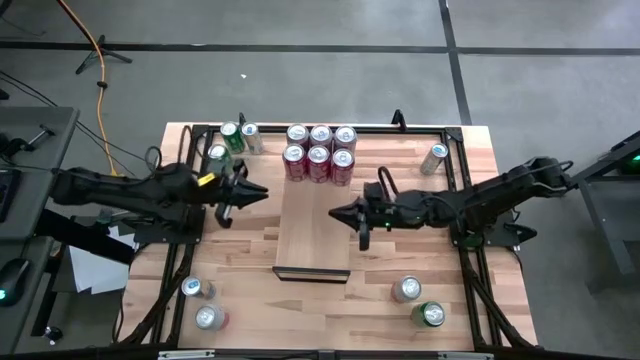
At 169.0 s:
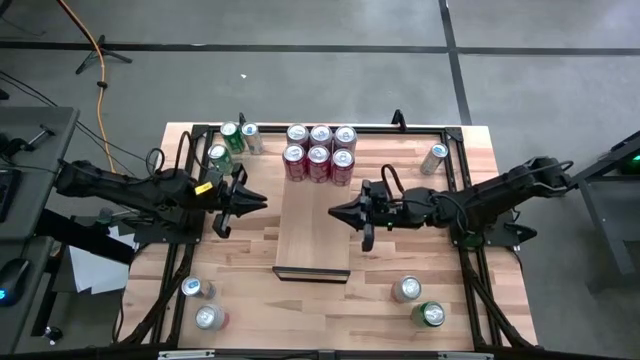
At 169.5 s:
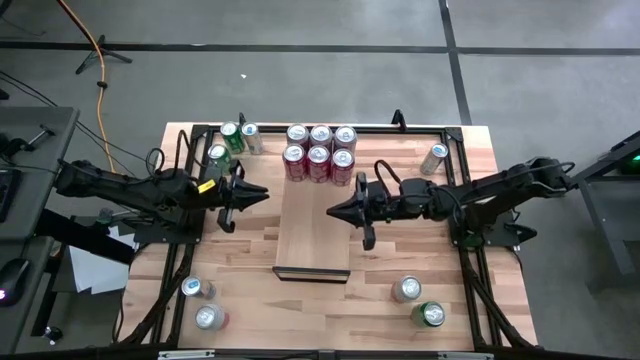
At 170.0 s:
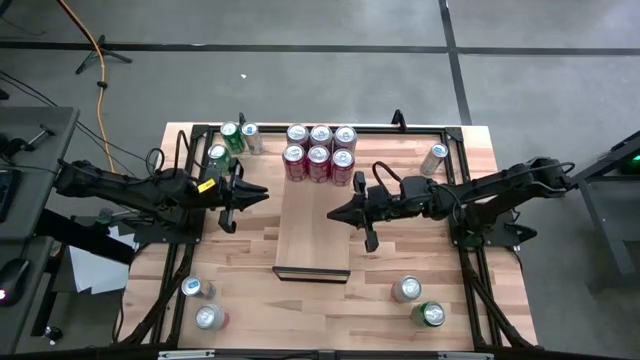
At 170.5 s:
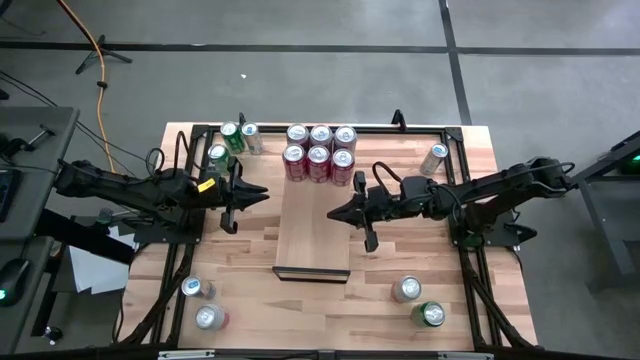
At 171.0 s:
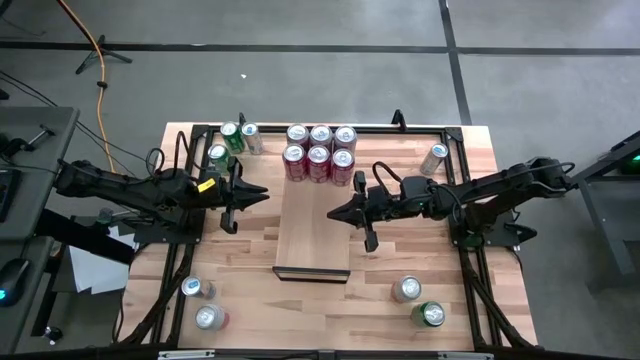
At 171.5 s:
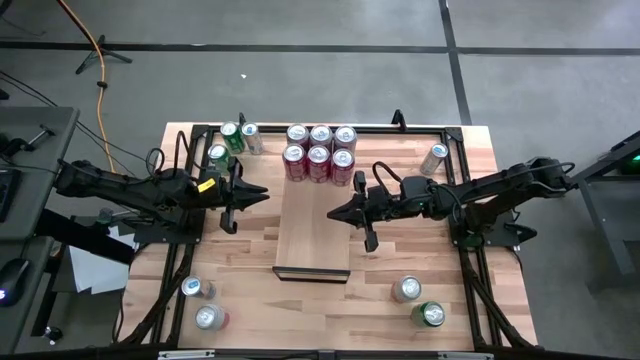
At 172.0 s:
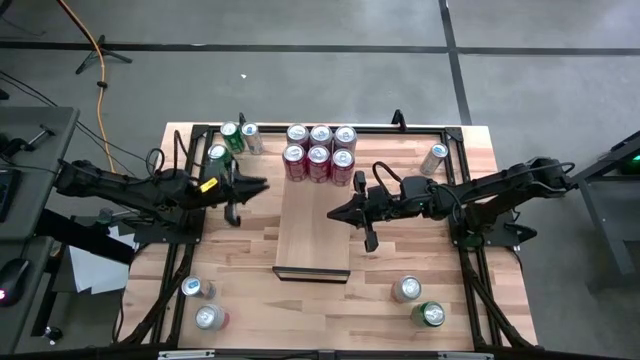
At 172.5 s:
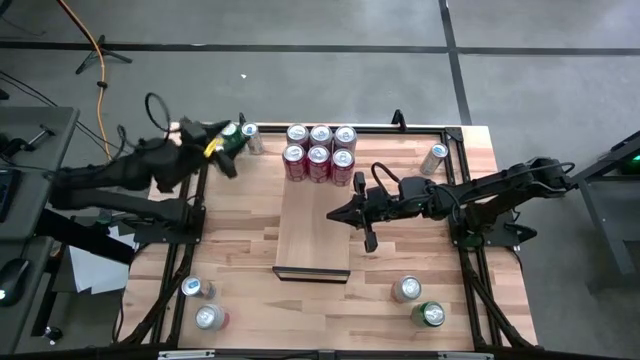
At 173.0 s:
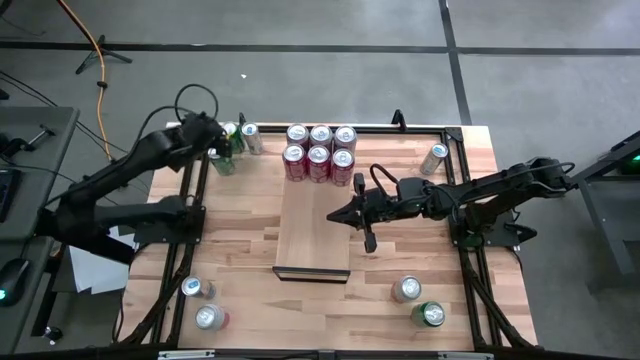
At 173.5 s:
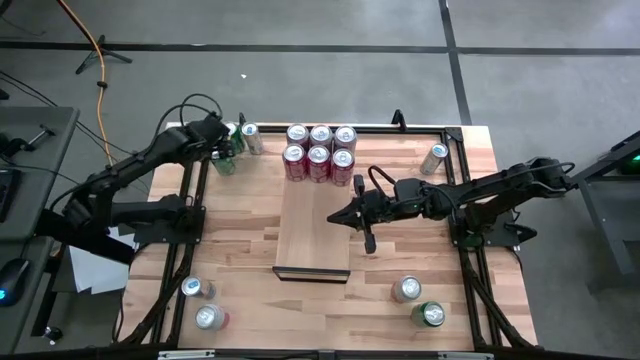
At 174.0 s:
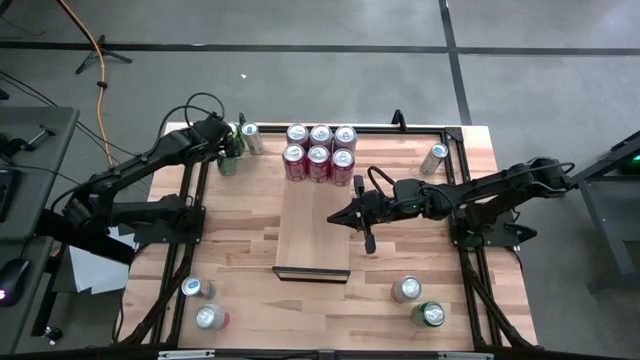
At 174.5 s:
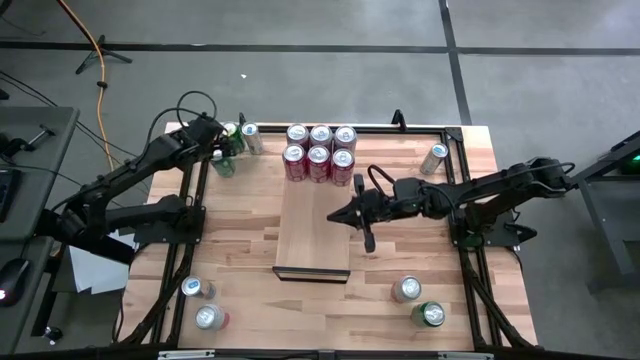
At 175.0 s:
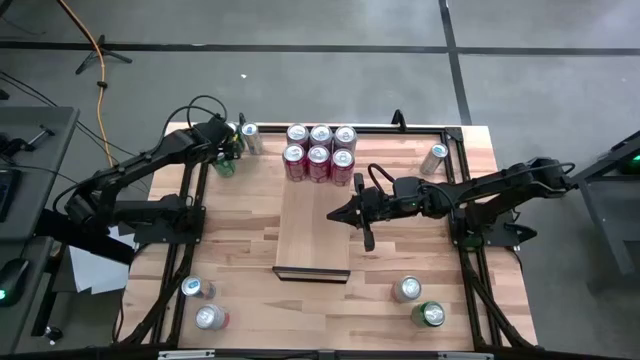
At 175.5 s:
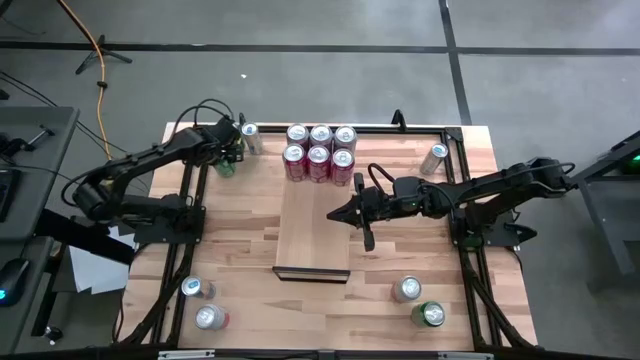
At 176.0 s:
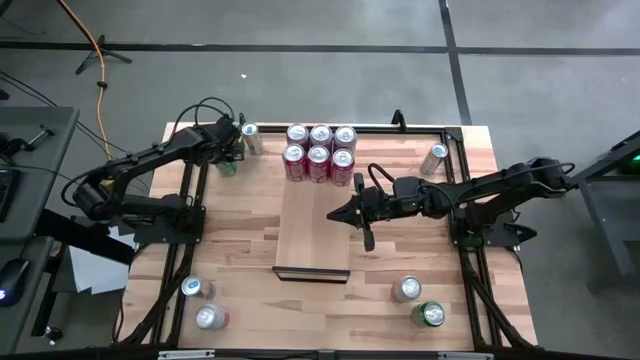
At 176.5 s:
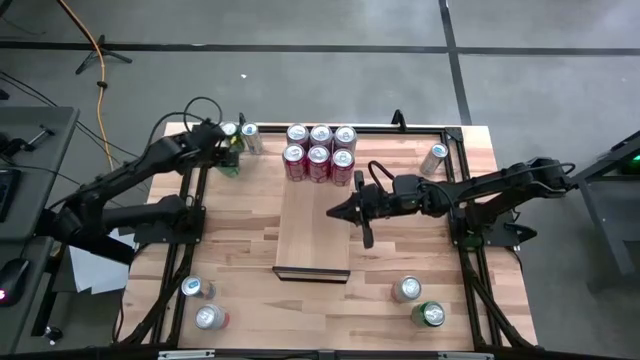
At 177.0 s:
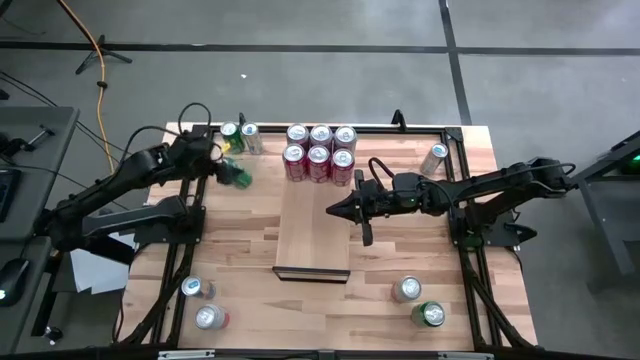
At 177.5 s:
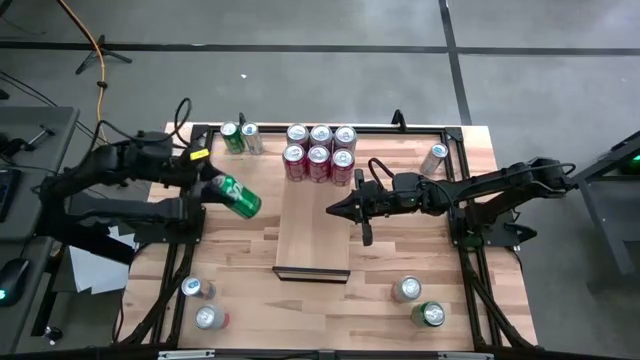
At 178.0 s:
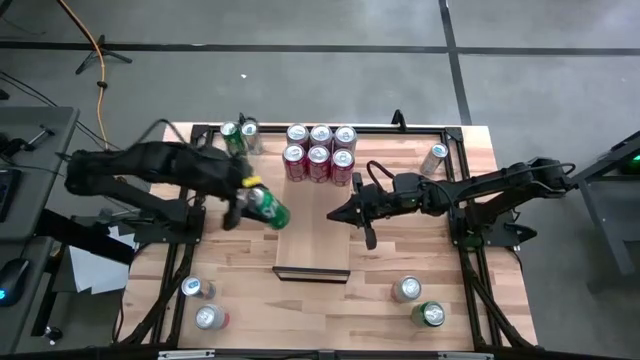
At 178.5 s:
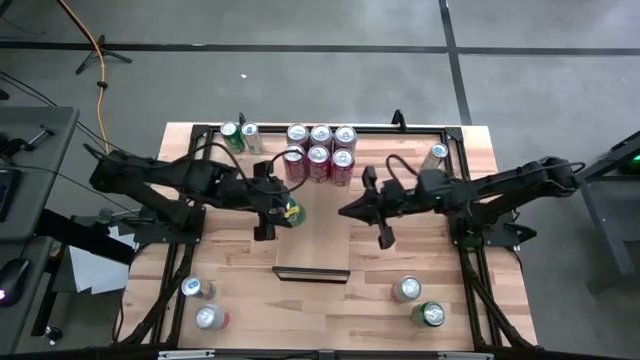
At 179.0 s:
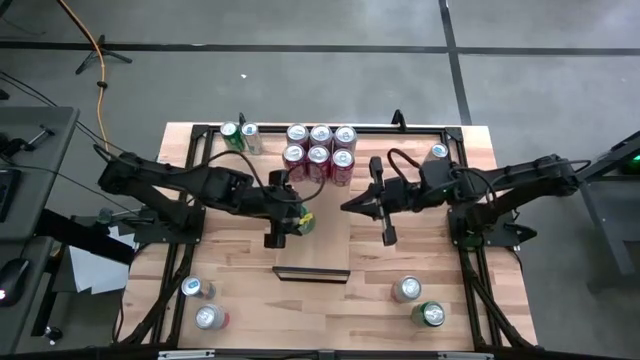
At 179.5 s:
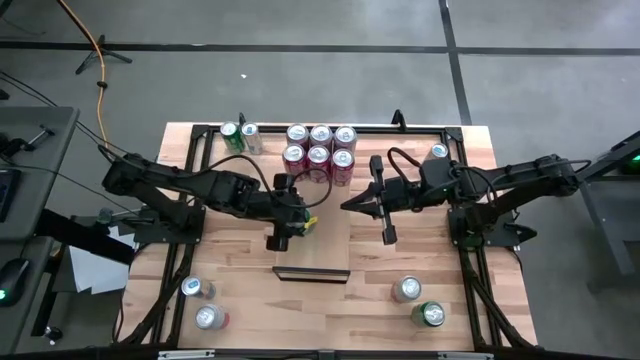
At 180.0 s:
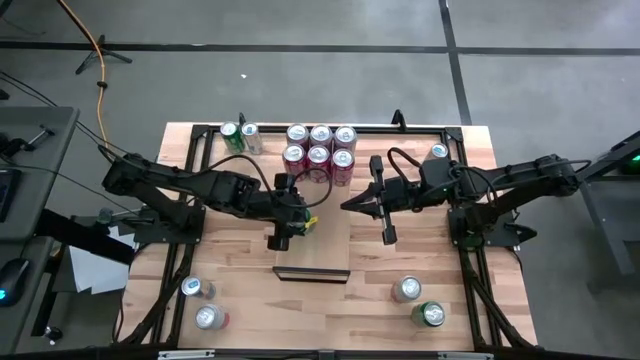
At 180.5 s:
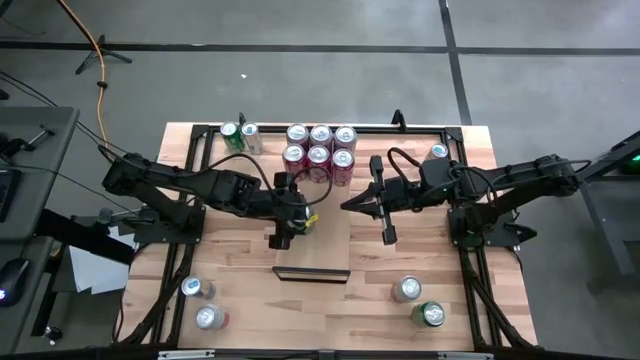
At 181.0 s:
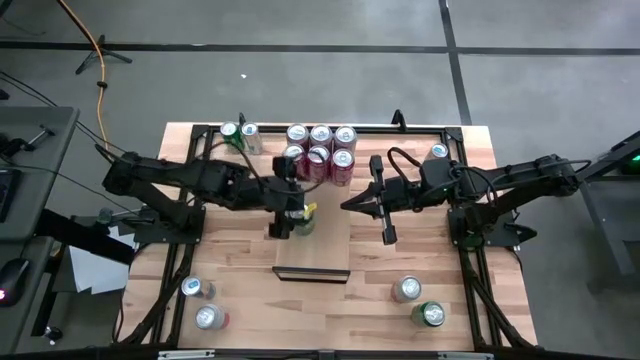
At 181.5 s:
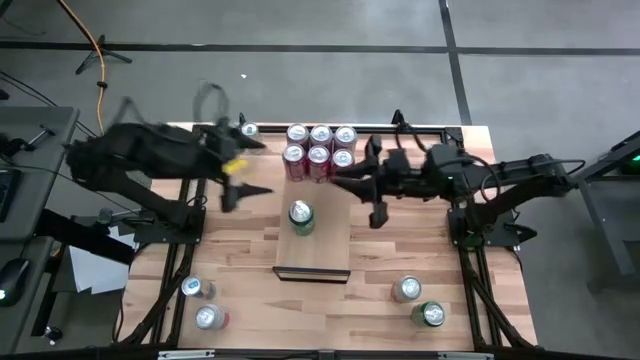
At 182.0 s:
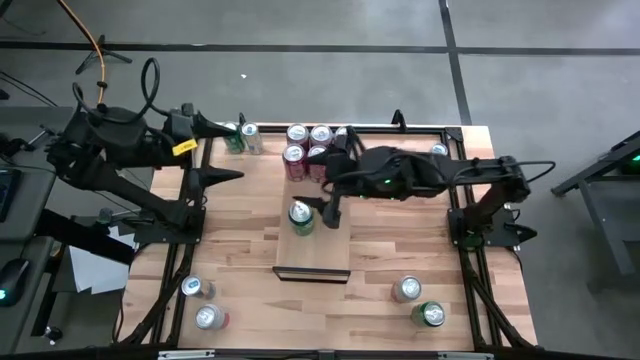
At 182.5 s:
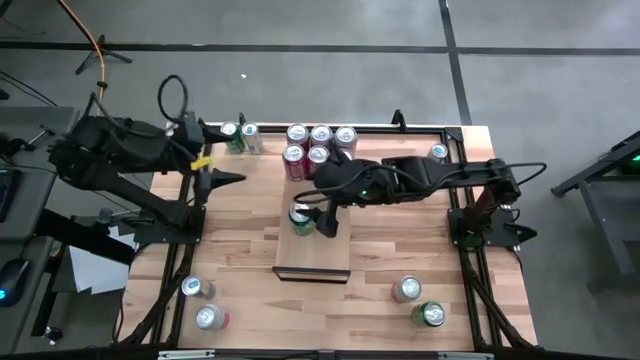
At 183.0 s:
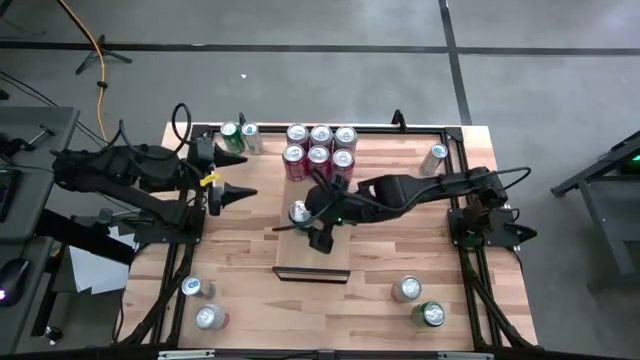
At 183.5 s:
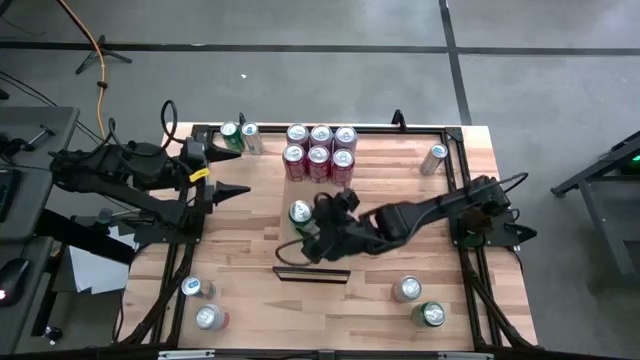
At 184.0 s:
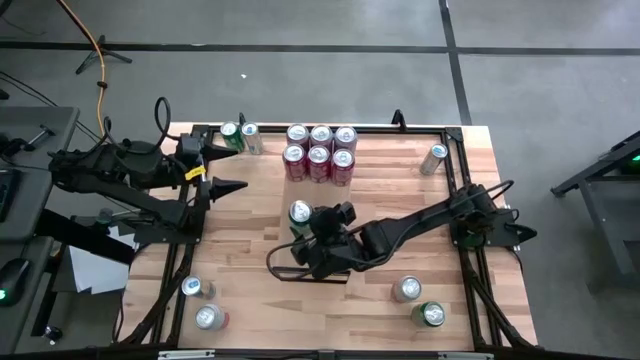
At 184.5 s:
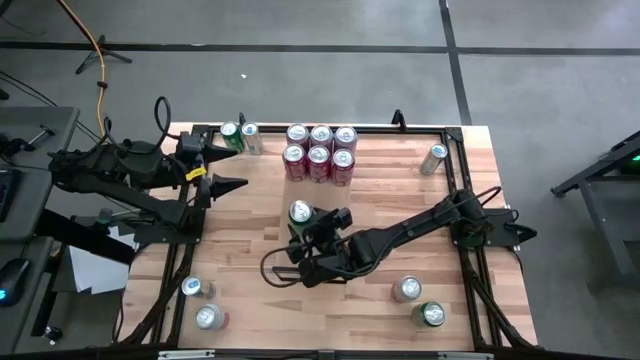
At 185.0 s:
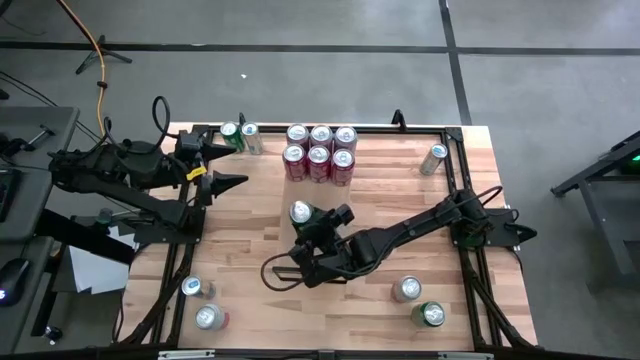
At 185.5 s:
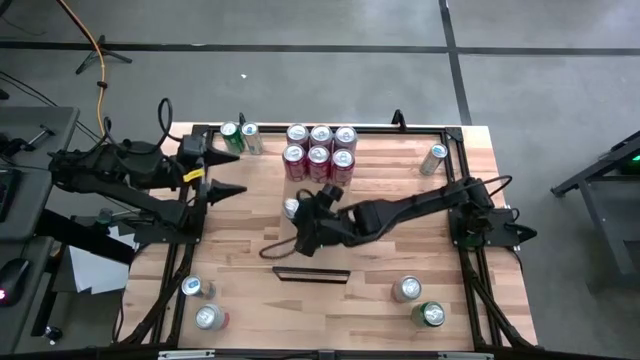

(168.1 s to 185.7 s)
Task: Place canned beverage on shelf
Put the bottom left green soda can on the shelf

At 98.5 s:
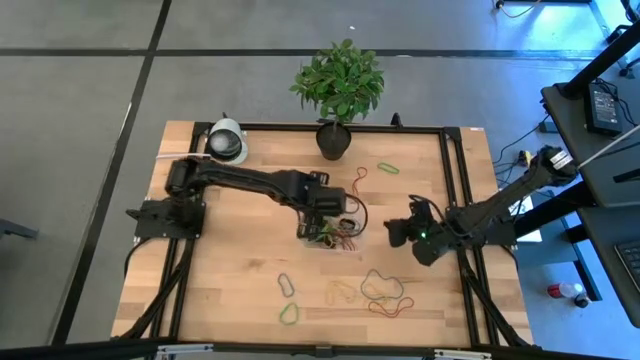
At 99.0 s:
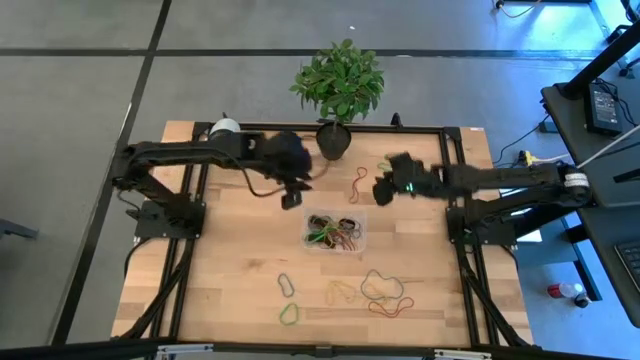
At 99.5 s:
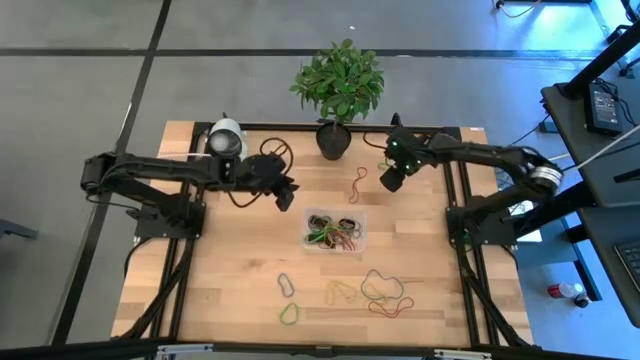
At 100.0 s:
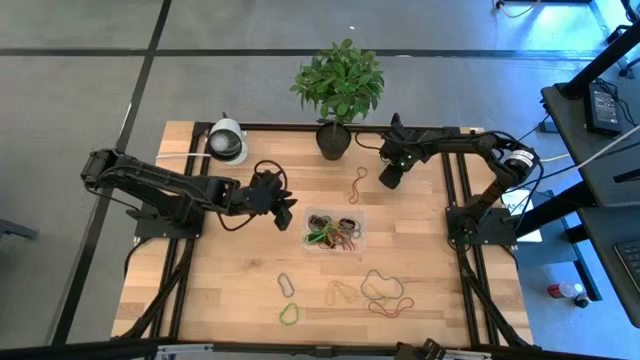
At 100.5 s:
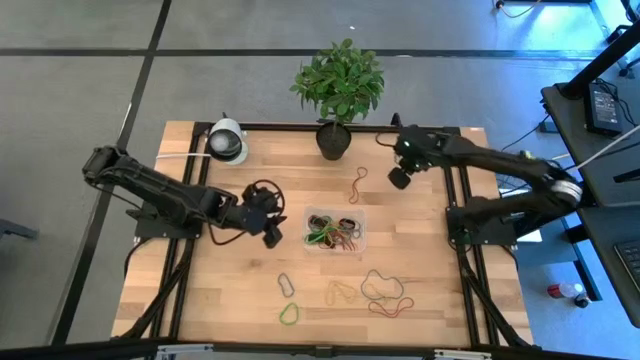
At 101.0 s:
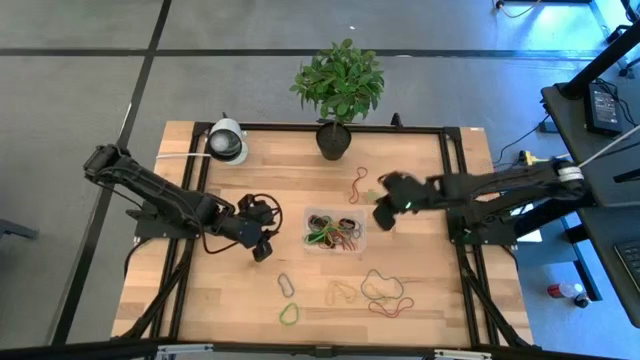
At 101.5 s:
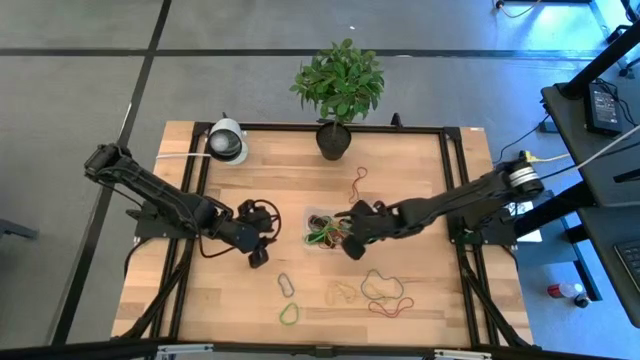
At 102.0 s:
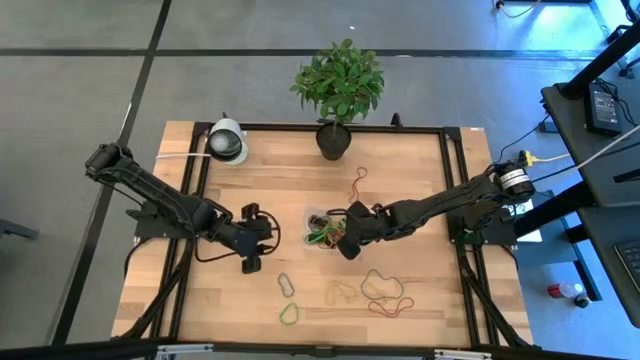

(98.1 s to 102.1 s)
Task: Pick and place rubber bands into bin
Put the green rubber band into the bin

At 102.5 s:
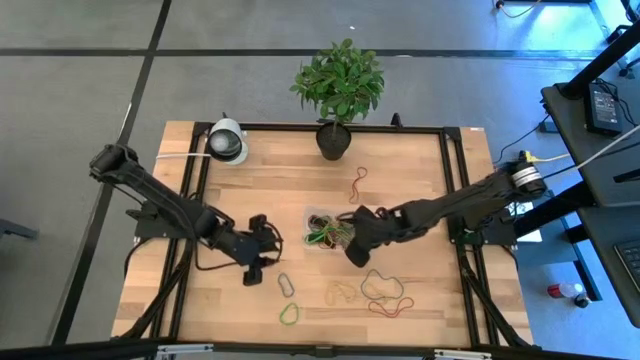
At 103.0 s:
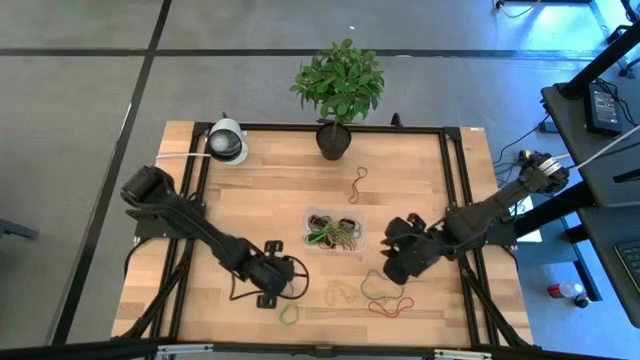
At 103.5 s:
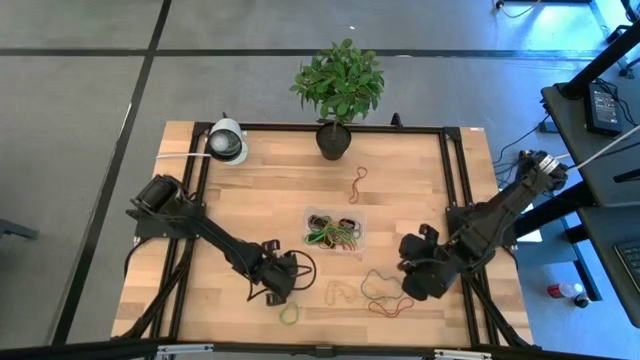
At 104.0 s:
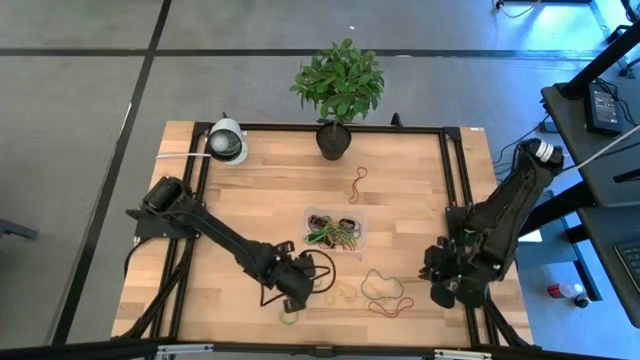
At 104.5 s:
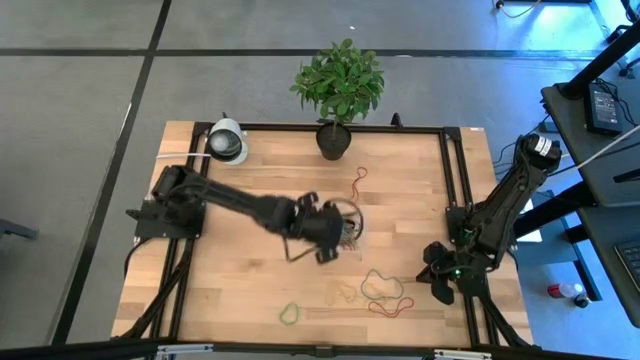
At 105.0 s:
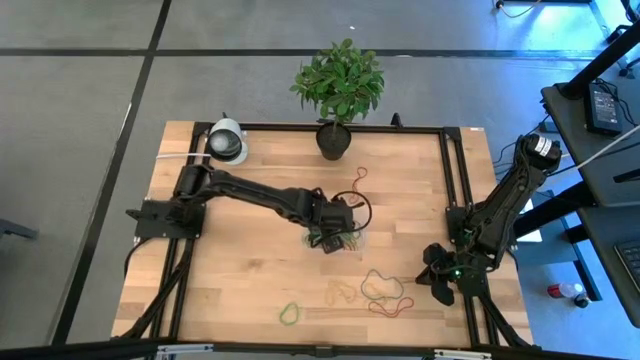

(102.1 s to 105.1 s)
Put the blue rubber band into the bin
